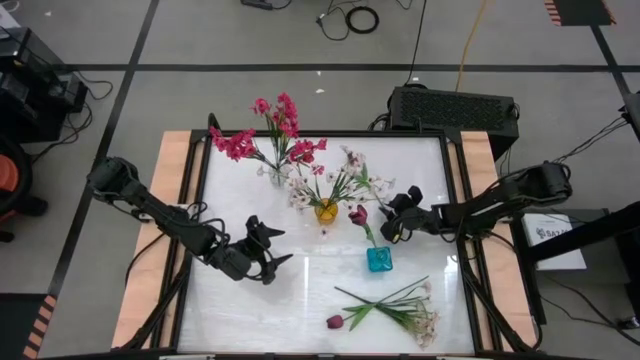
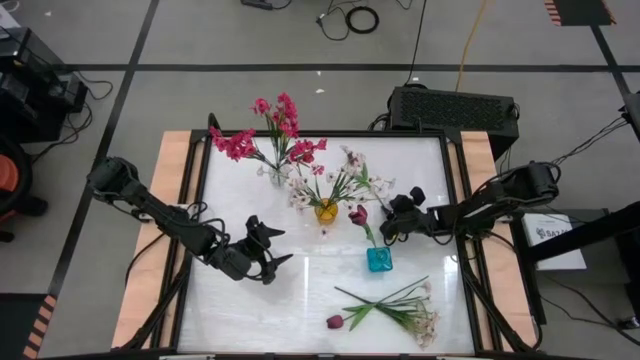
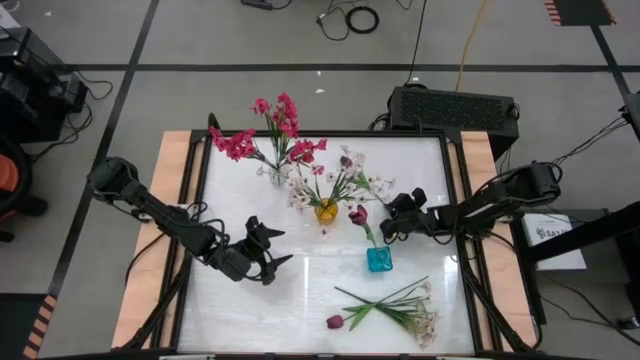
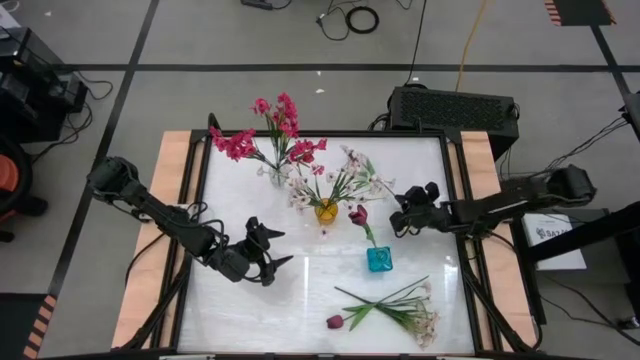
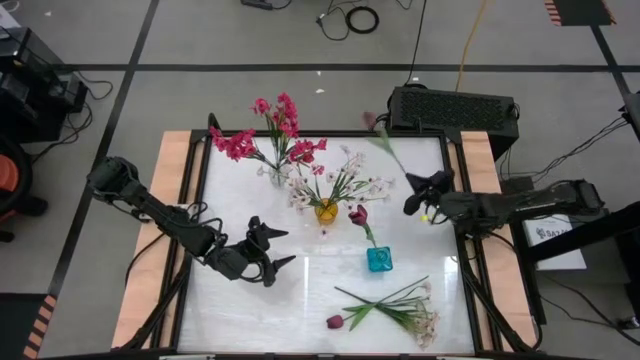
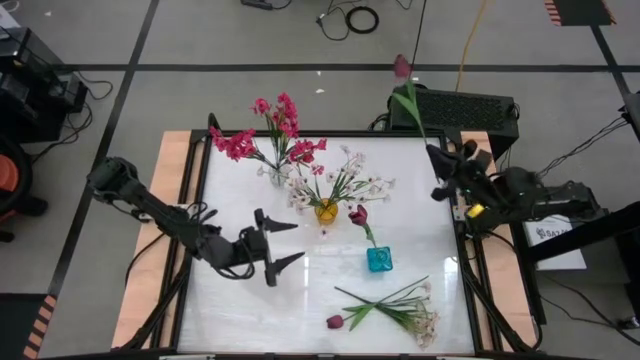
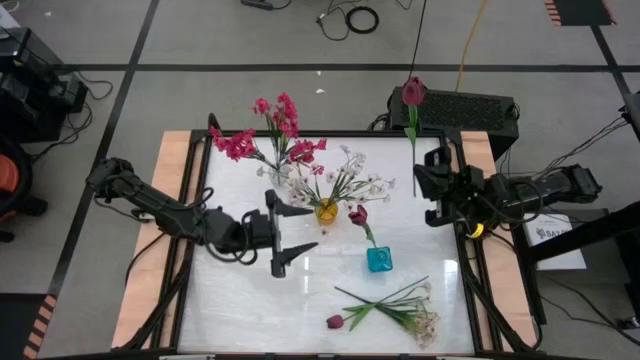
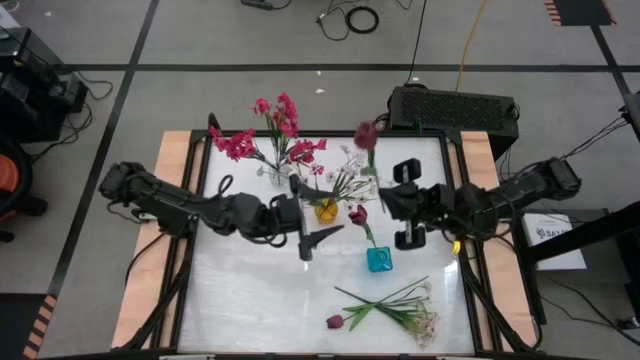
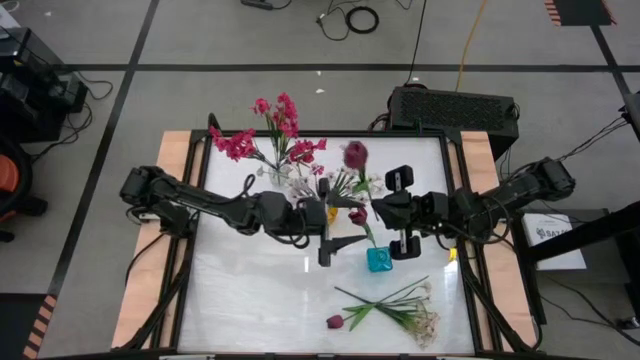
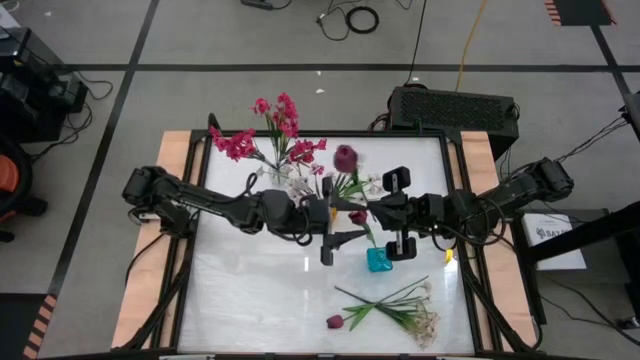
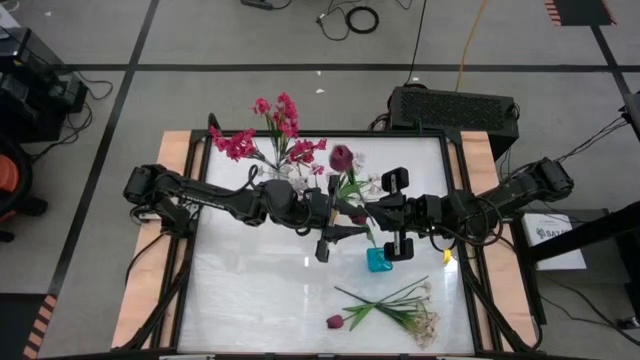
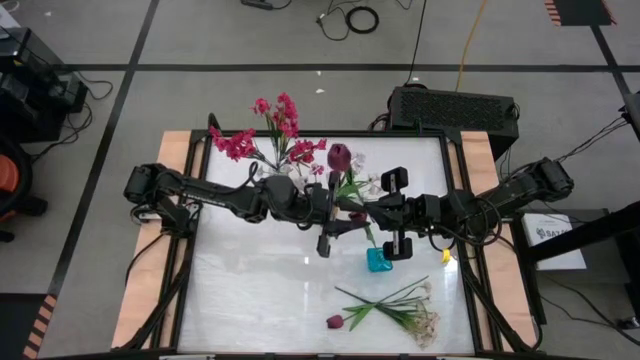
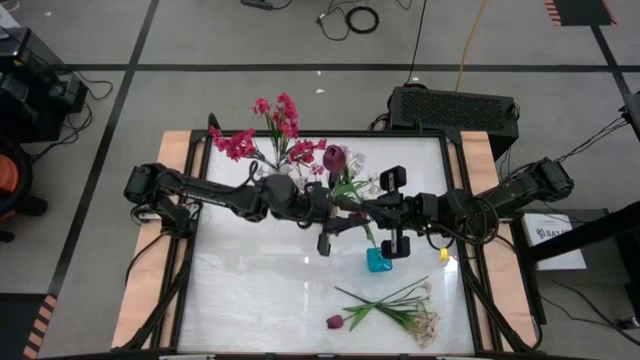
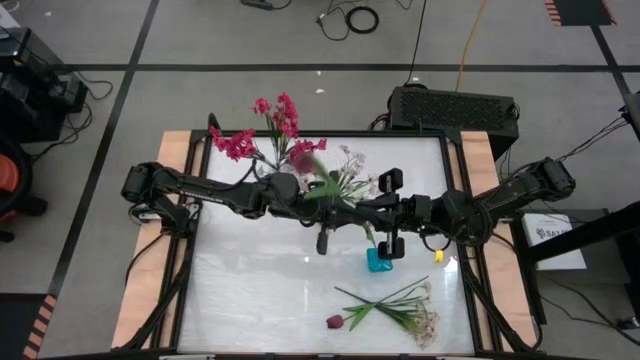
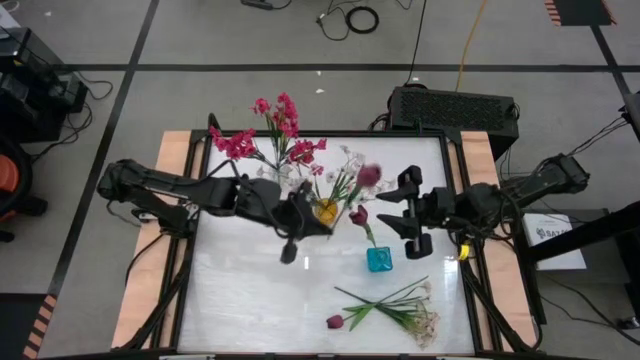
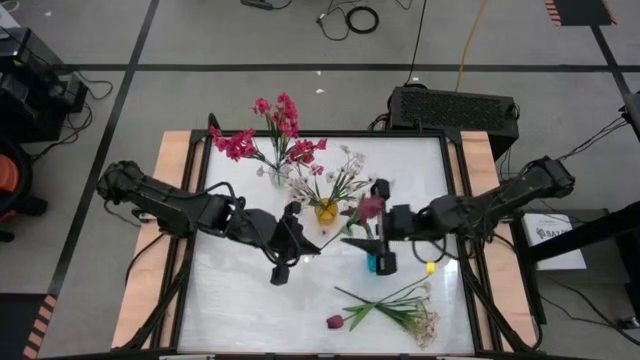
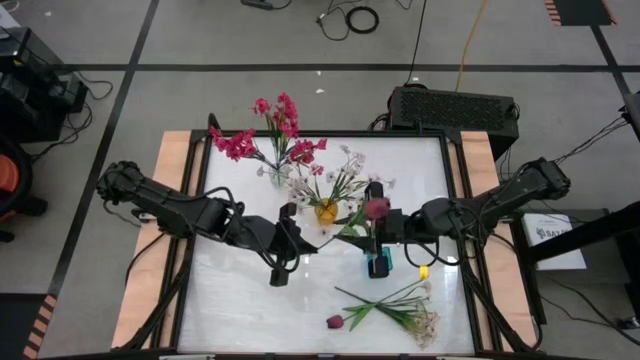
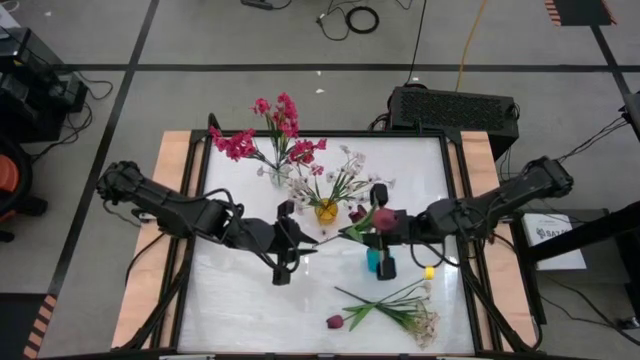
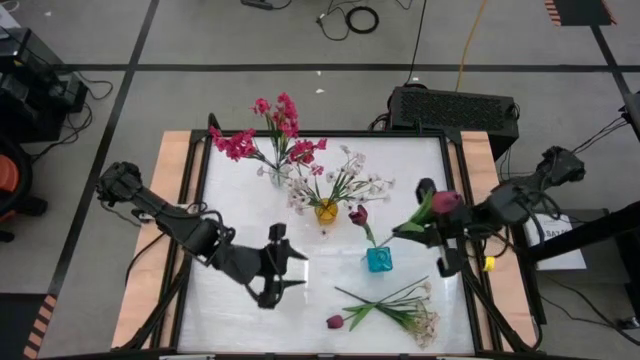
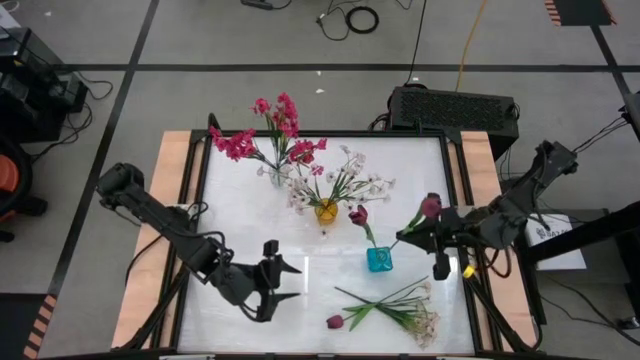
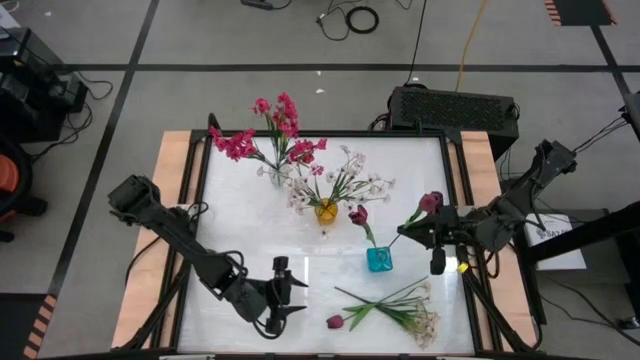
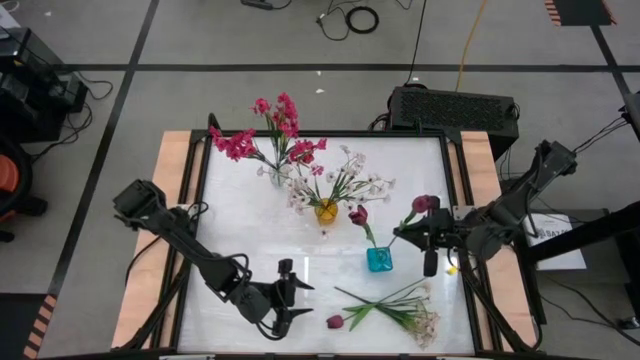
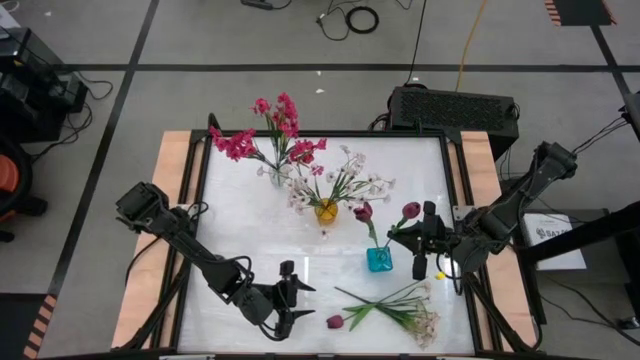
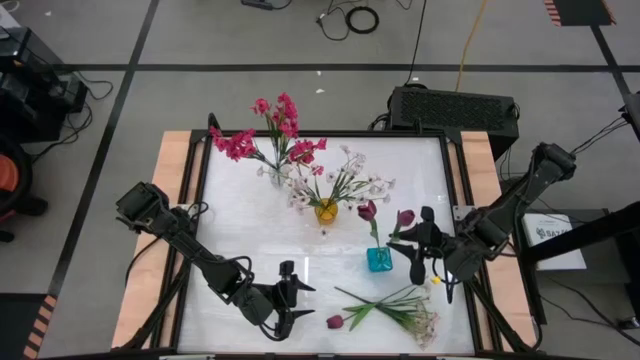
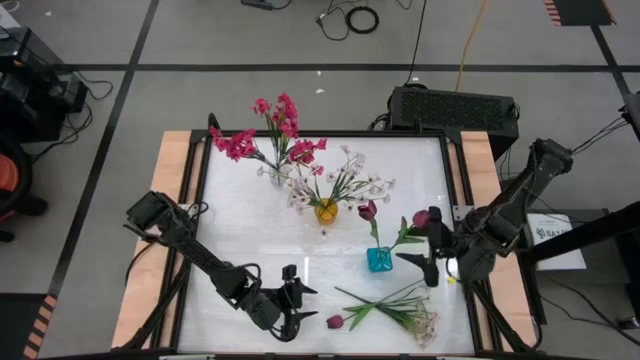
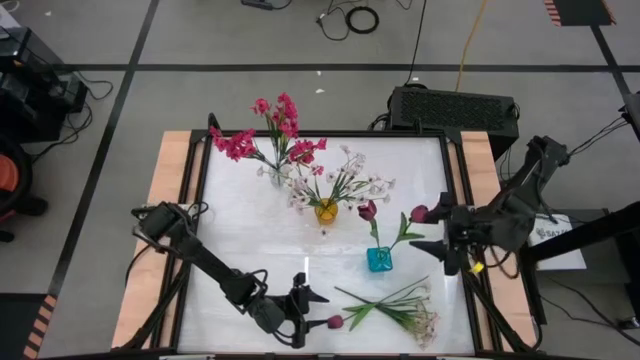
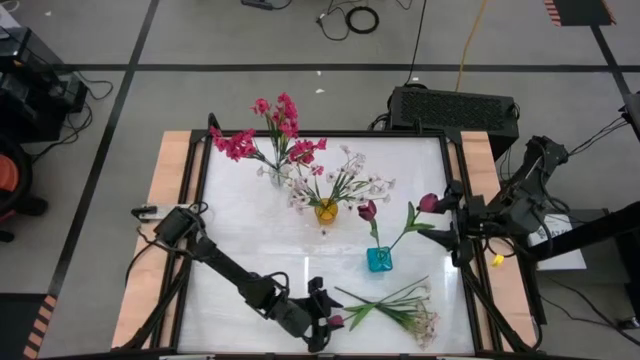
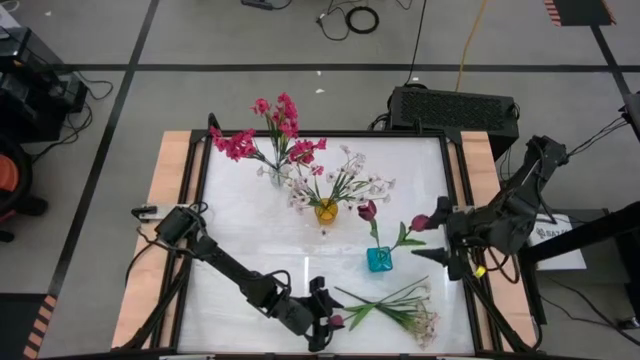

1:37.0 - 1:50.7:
Task: Sort flowers into vase by color
Put the top right red flower into the blue vase

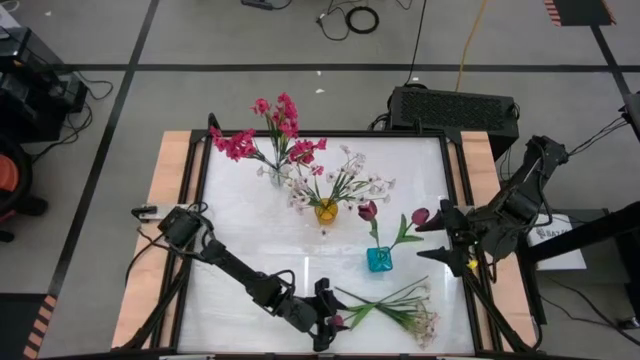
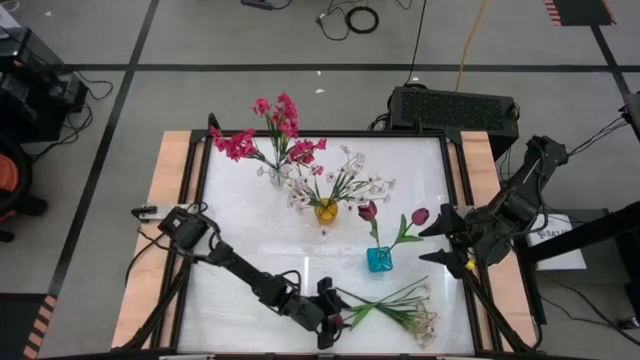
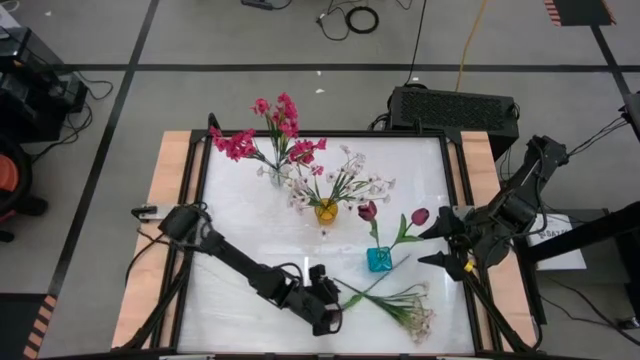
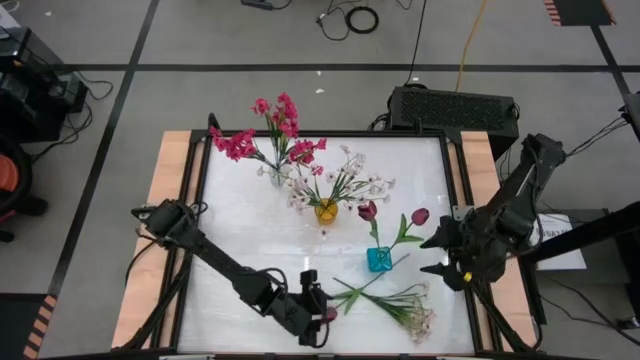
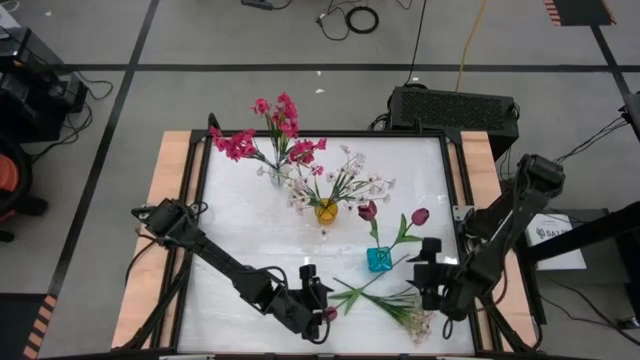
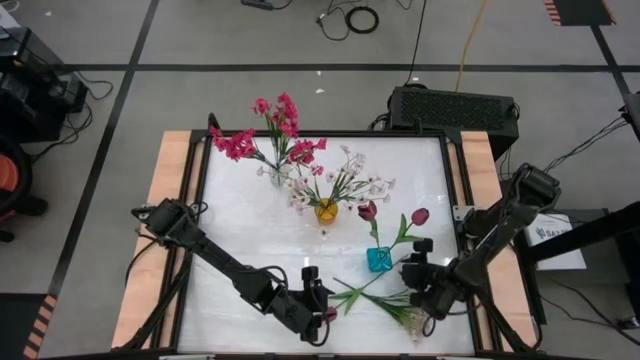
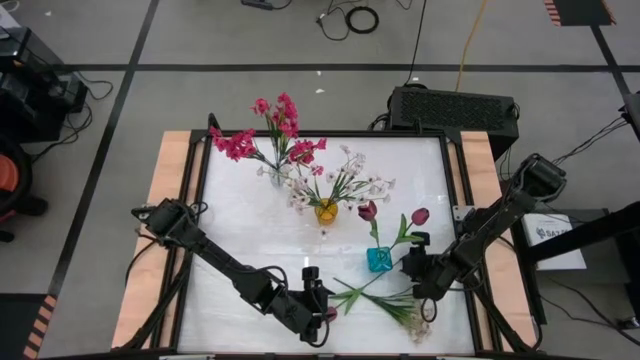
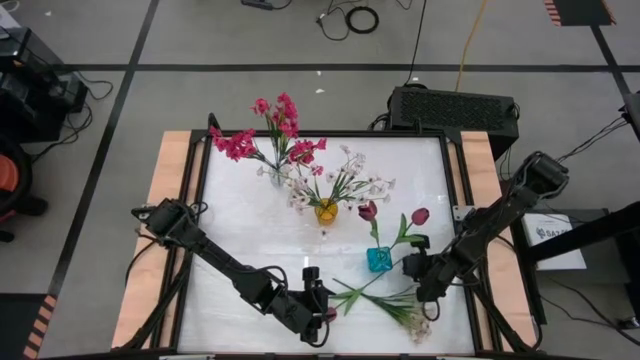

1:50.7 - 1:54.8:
Put the red flower into the blue vase

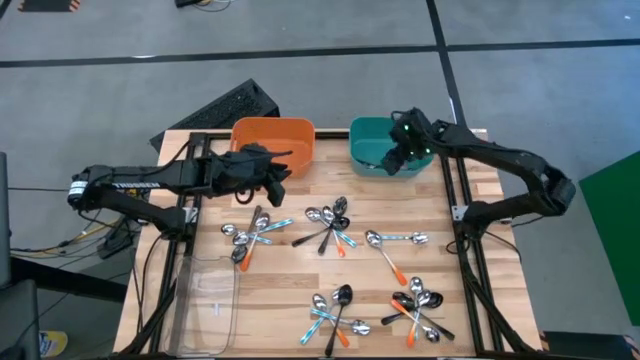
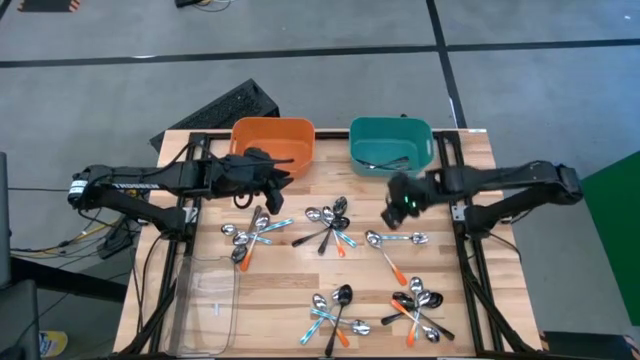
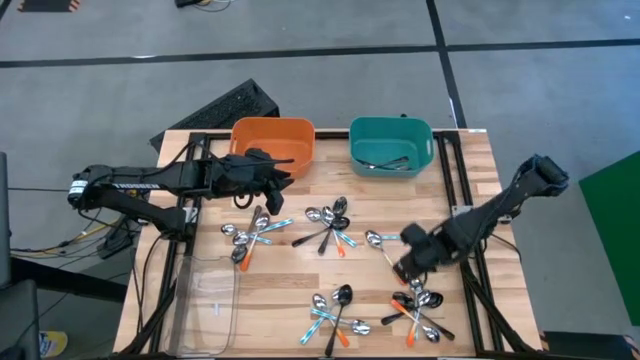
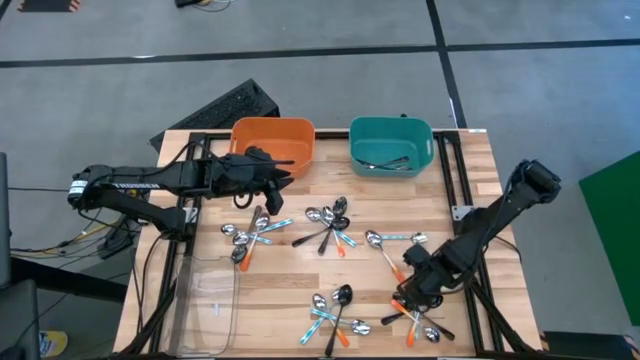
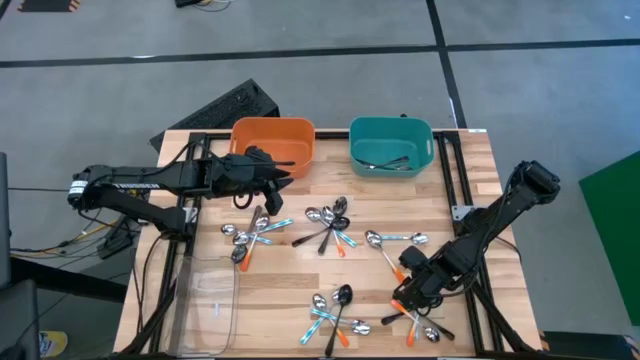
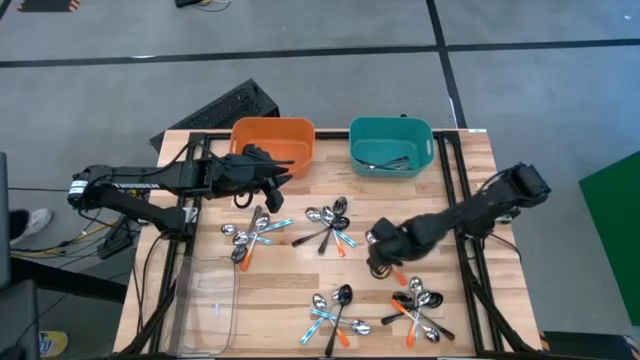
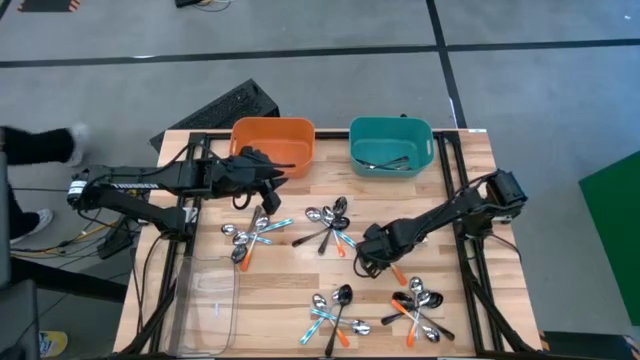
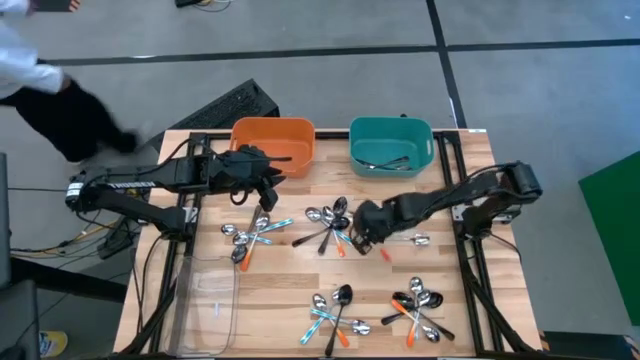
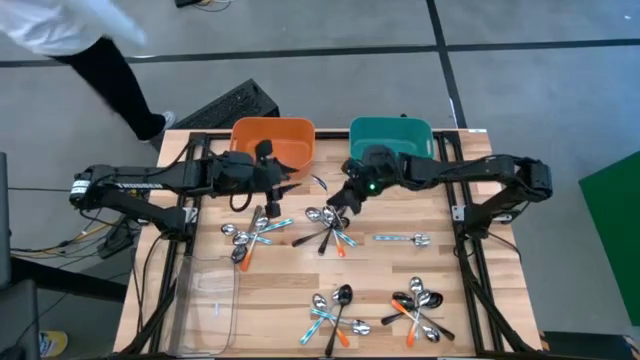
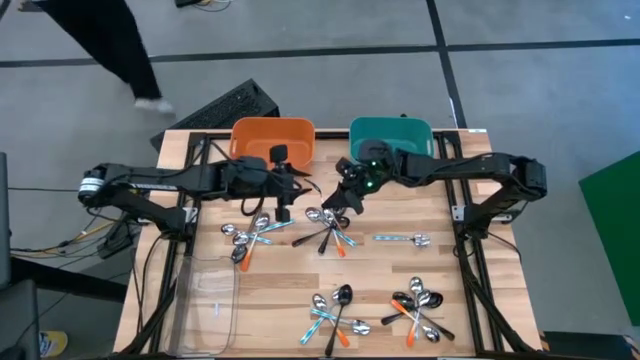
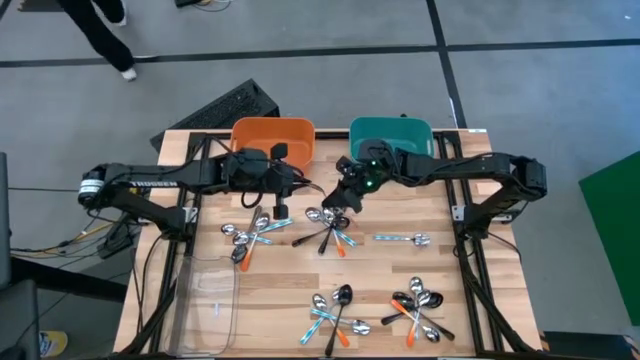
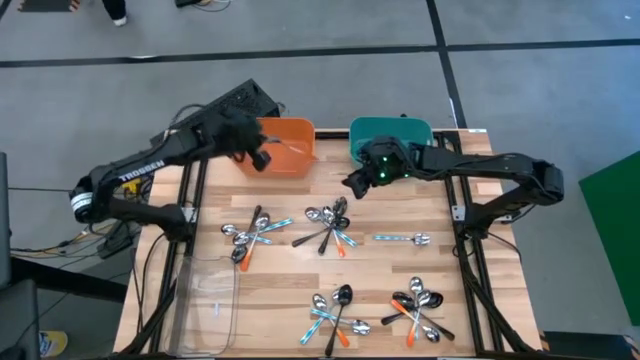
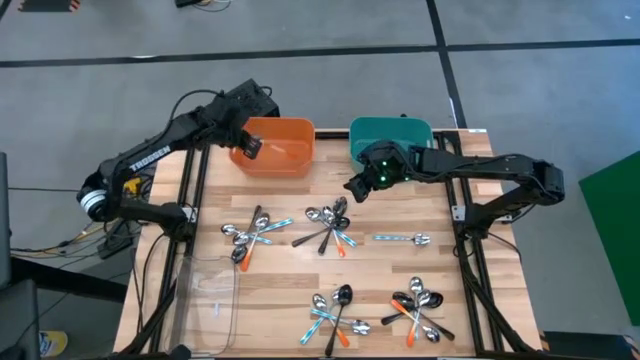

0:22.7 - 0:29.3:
Task: Sort silverware by color (type)
Put the orange spoon into the orange bin
